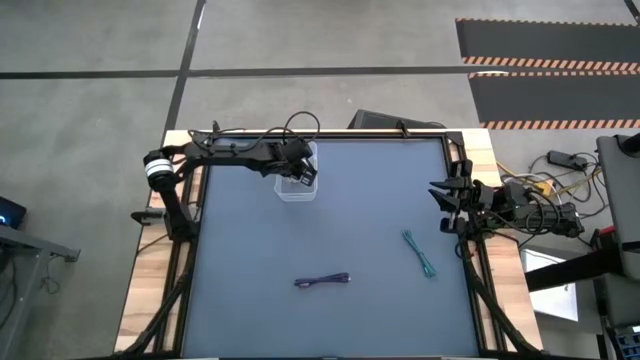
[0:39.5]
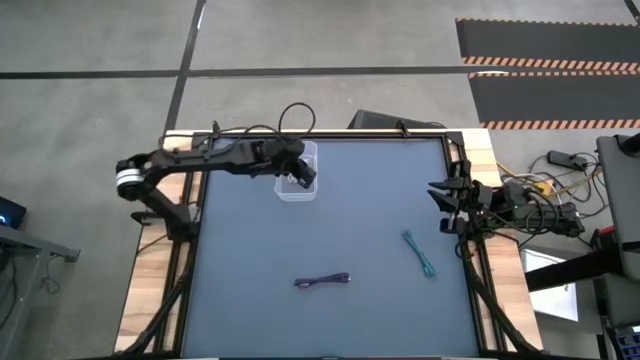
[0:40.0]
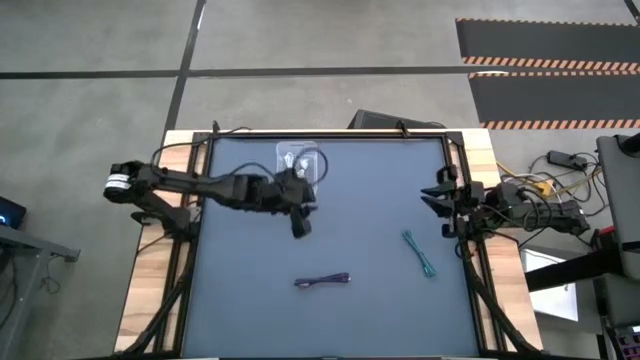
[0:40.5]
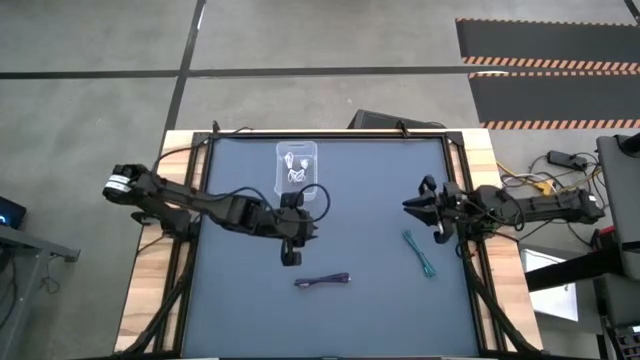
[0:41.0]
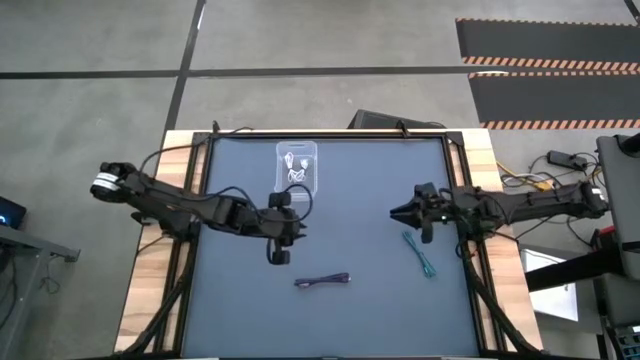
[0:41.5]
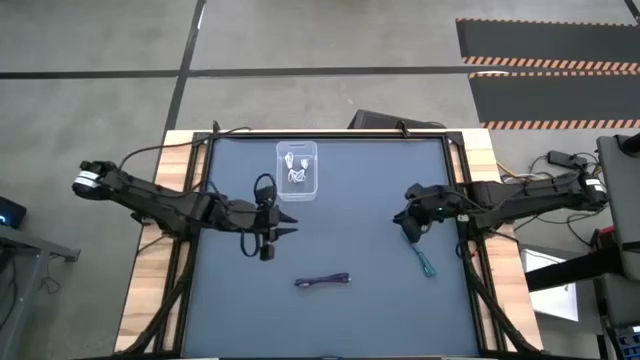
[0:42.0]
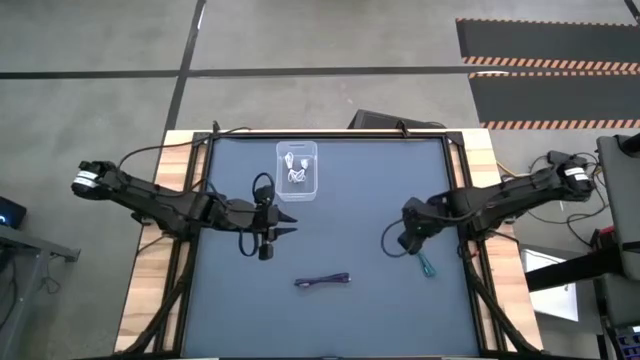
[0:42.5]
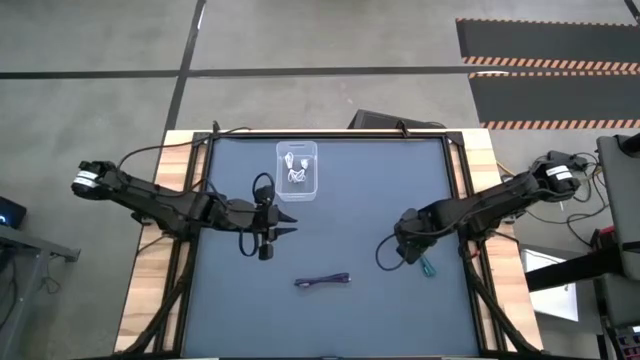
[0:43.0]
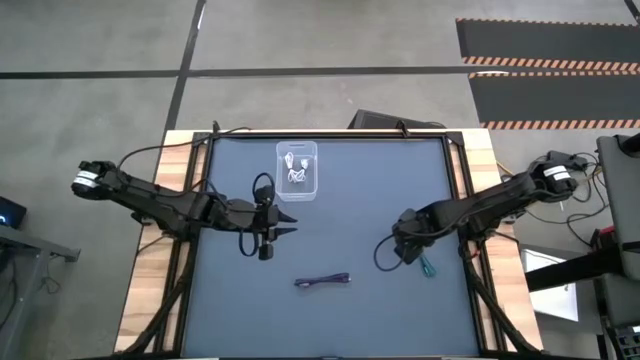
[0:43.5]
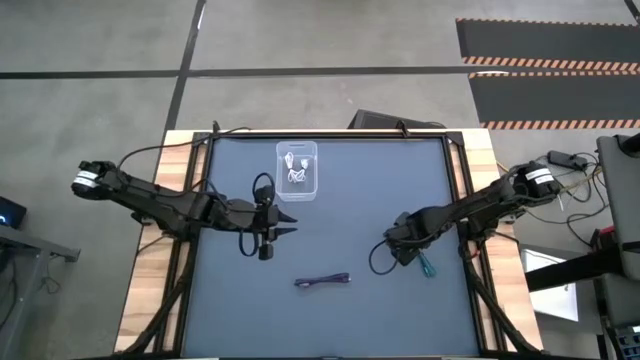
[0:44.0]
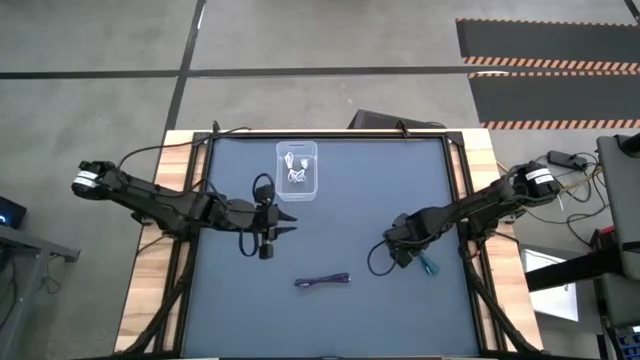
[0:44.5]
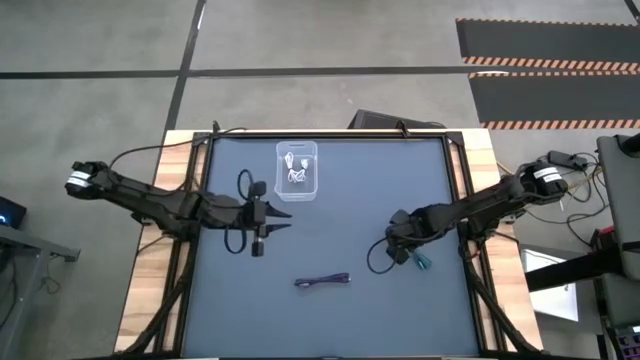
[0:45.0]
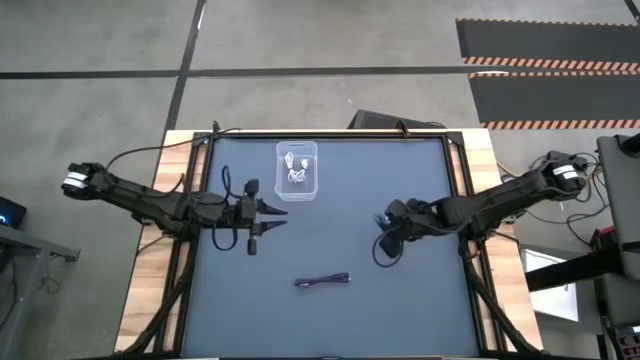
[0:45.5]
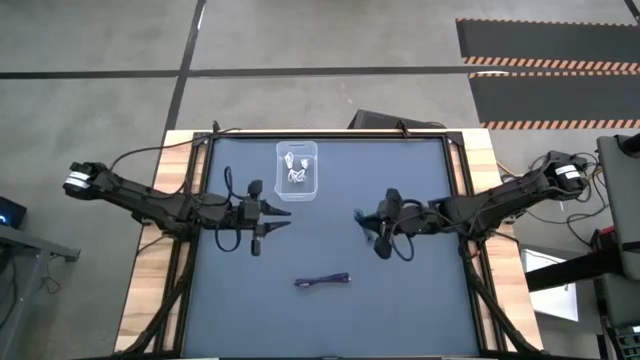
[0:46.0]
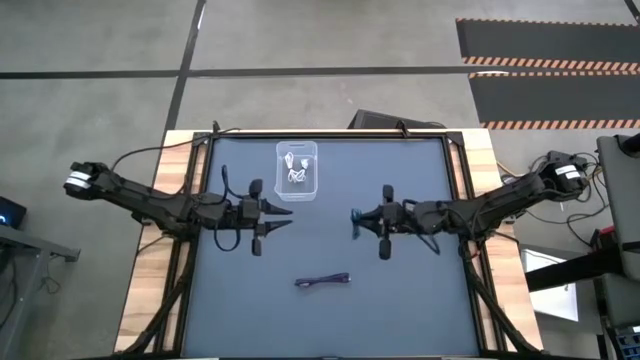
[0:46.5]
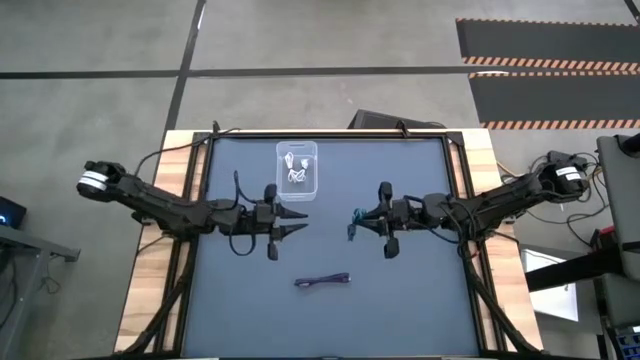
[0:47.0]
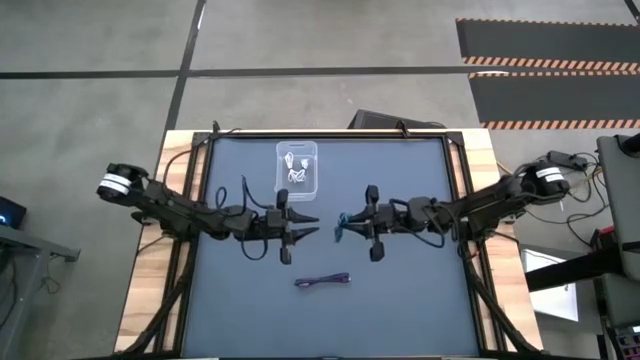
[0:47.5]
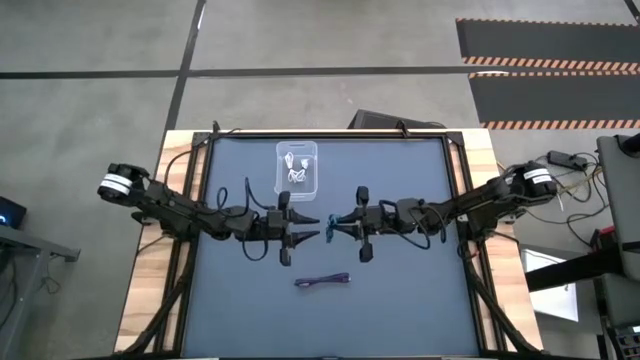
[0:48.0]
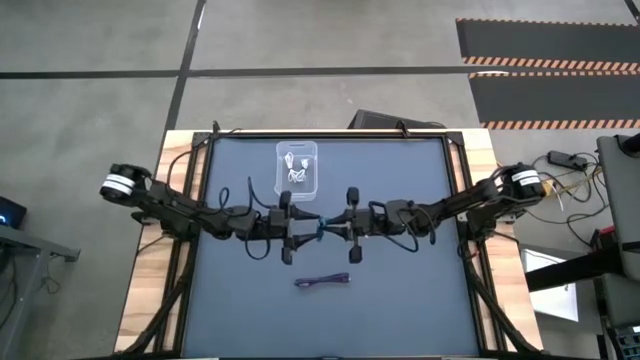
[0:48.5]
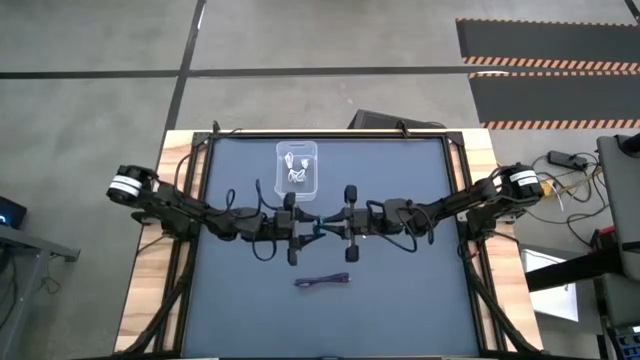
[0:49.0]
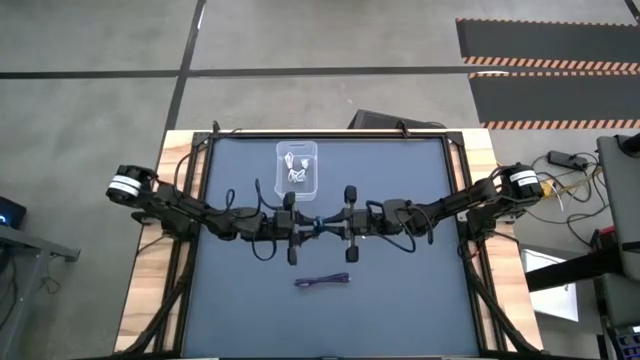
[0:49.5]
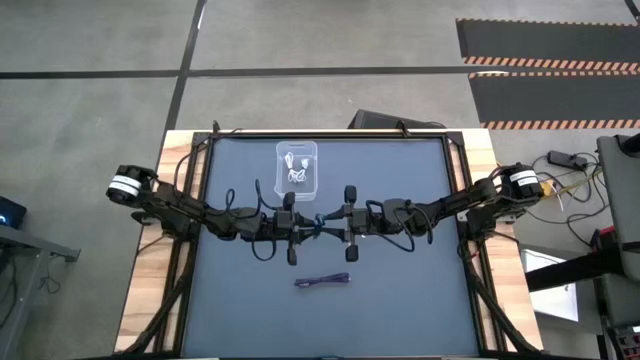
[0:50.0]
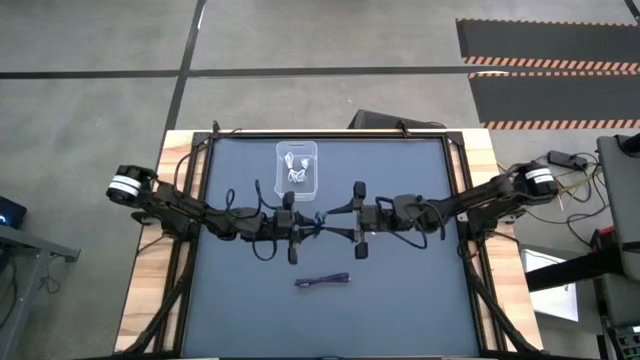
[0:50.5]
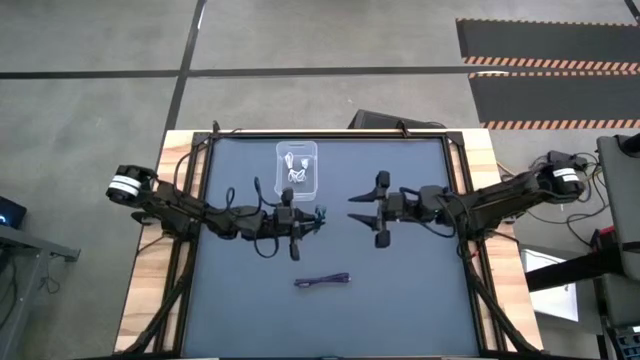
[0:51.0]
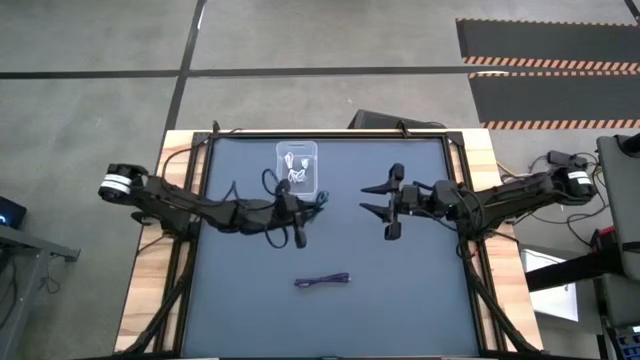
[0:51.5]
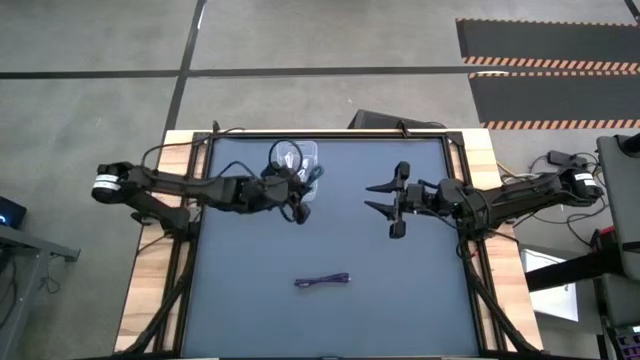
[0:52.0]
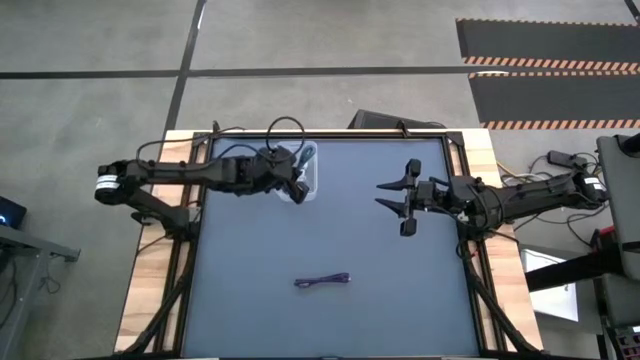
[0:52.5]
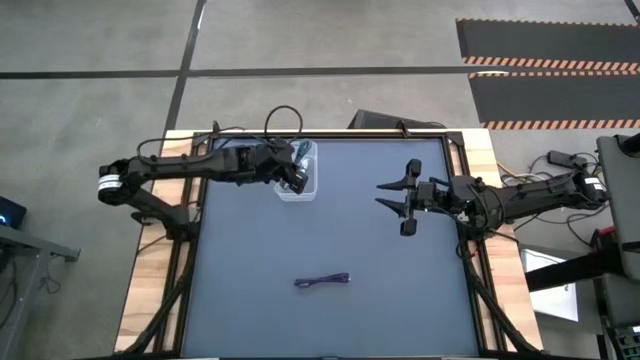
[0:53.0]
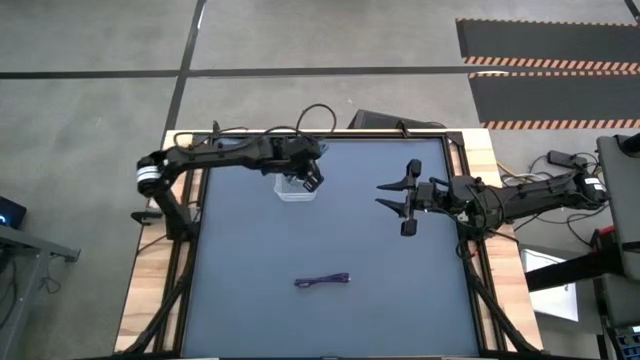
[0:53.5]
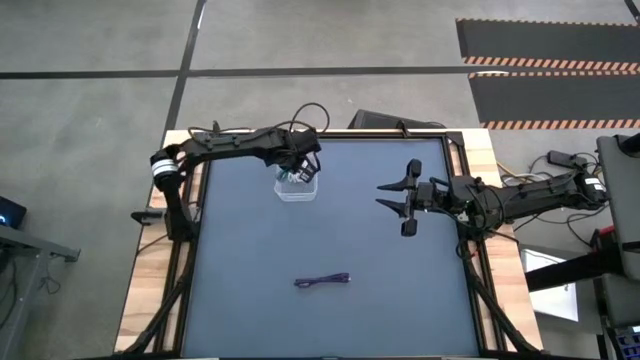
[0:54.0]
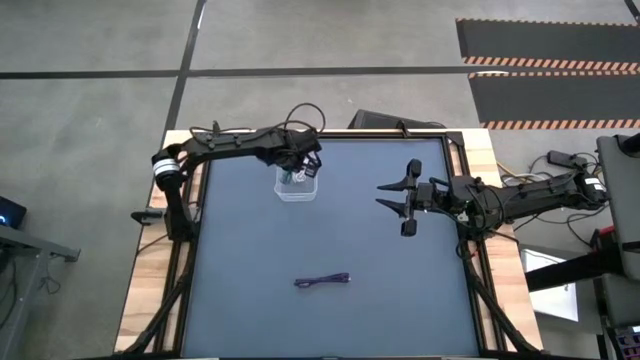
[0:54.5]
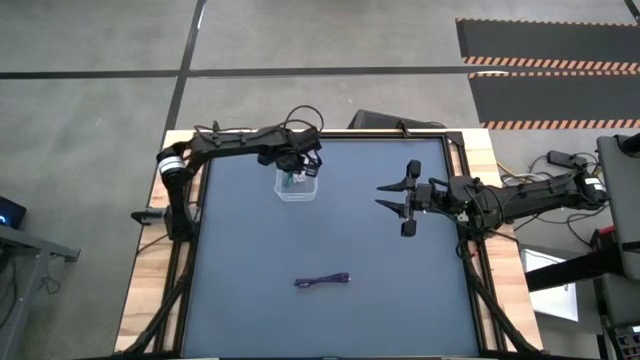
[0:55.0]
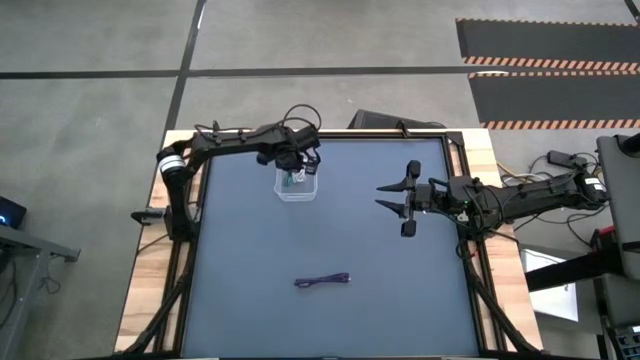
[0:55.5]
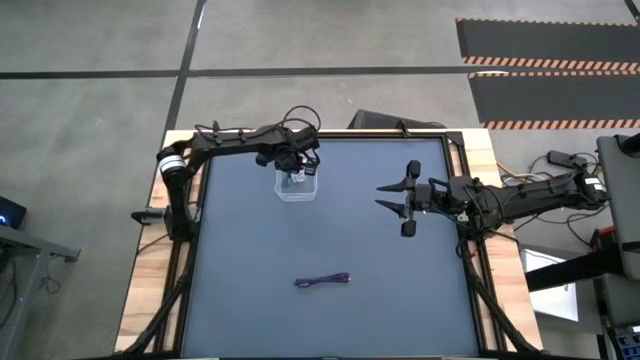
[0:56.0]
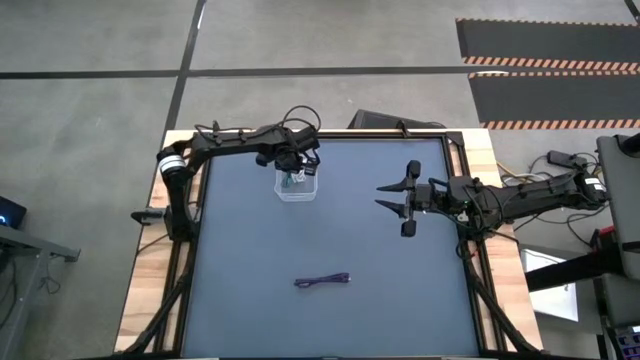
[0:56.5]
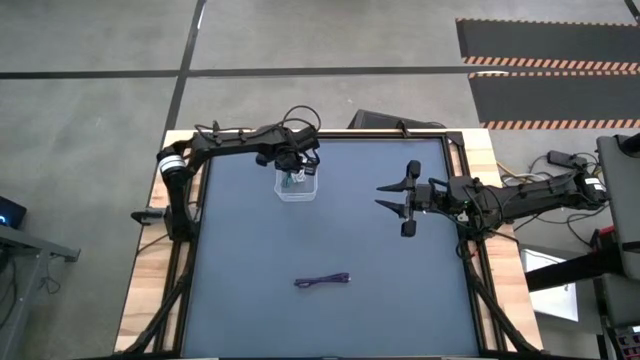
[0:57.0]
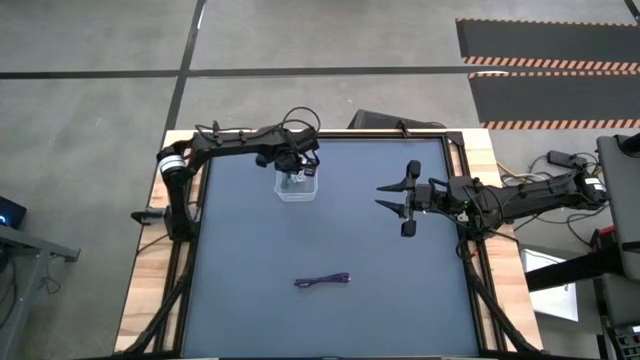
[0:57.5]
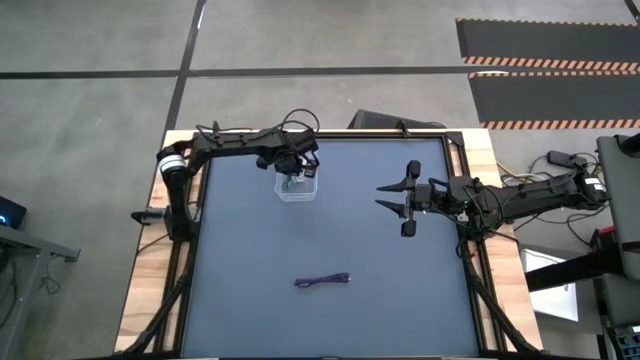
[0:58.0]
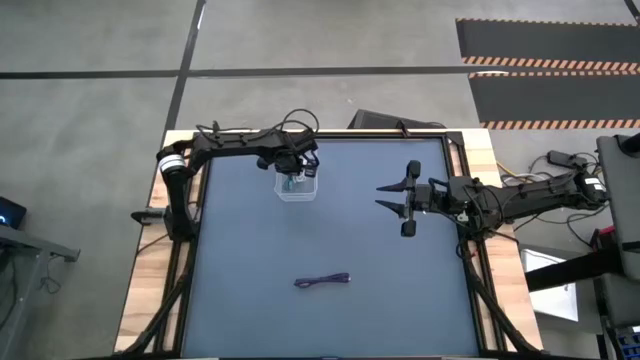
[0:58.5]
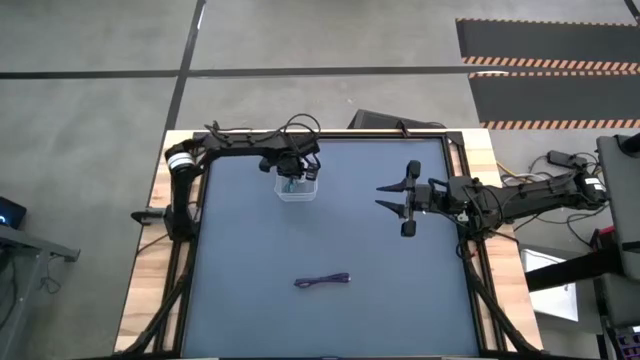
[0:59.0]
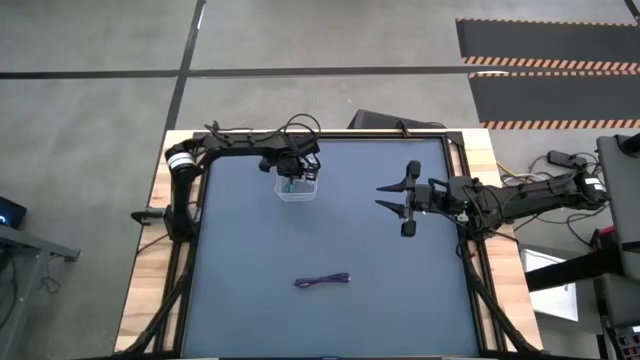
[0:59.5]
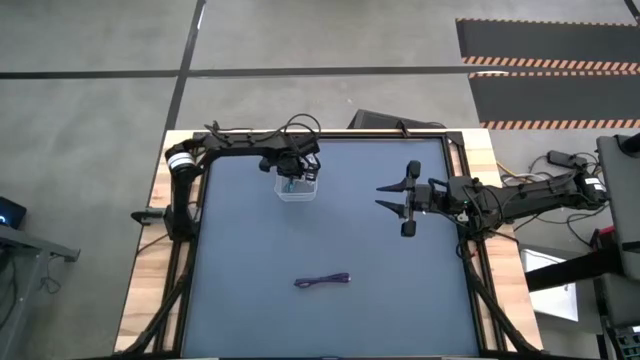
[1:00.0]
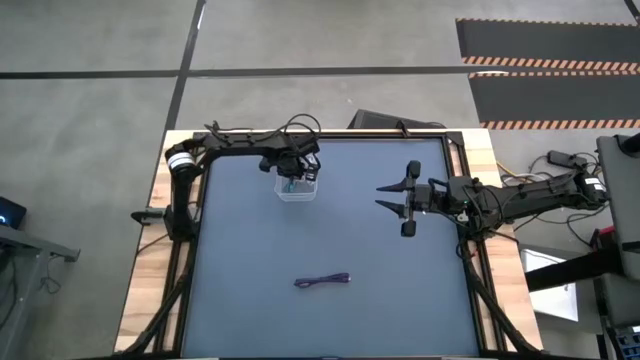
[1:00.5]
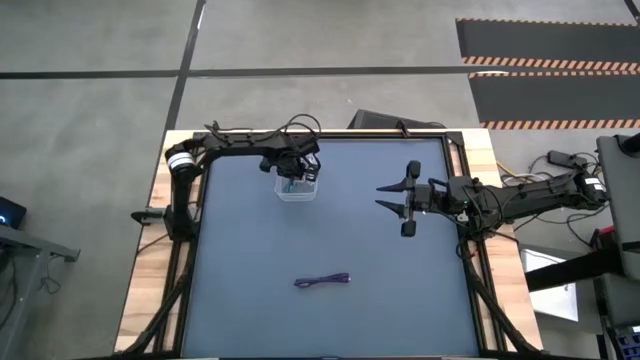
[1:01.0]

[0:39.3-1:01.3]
Task: Pick and place USB-C Cables
Put the blue charger cable into the transparent bin
